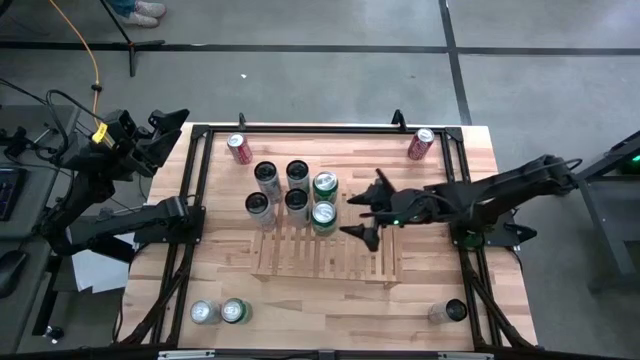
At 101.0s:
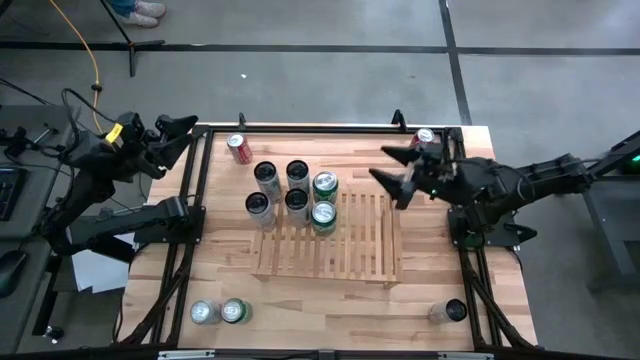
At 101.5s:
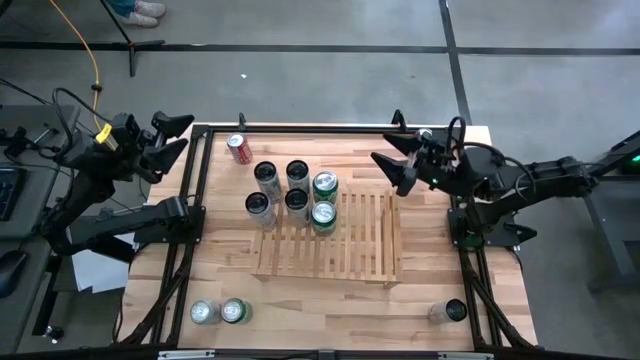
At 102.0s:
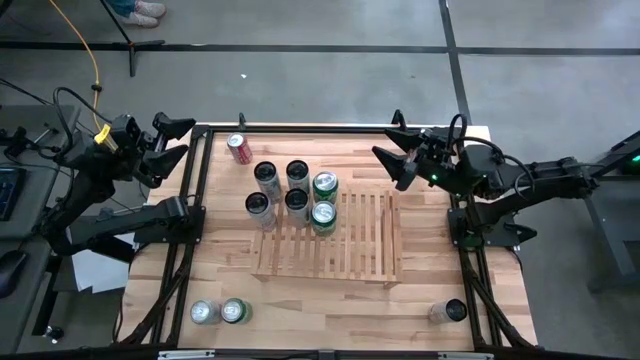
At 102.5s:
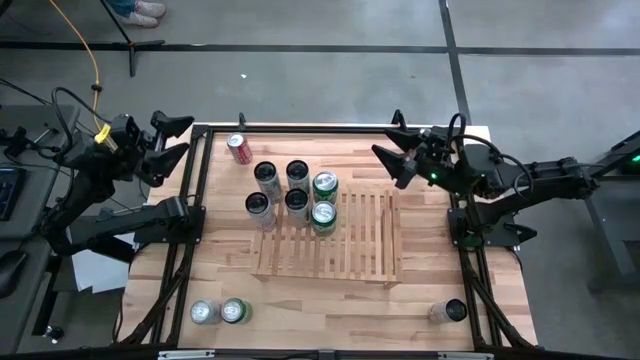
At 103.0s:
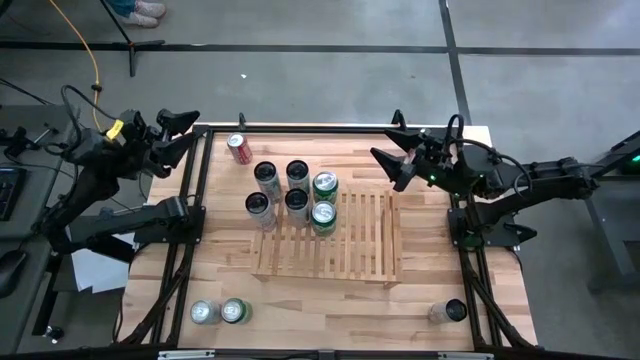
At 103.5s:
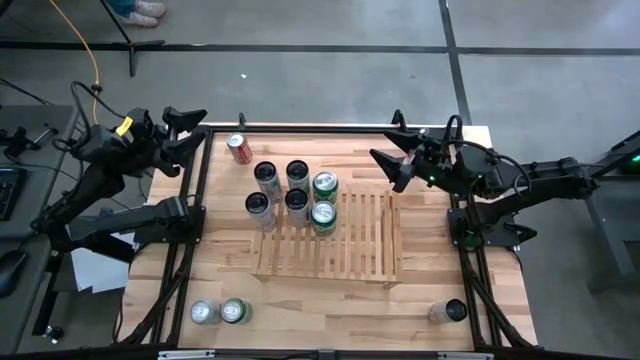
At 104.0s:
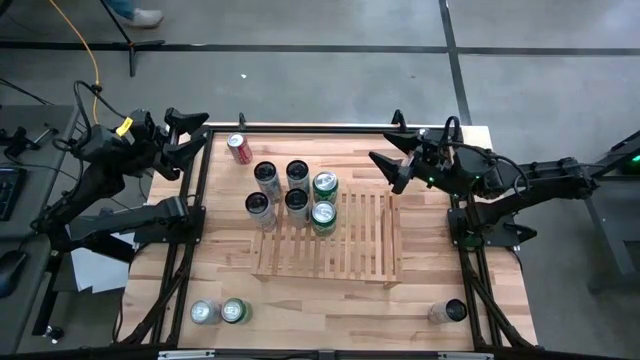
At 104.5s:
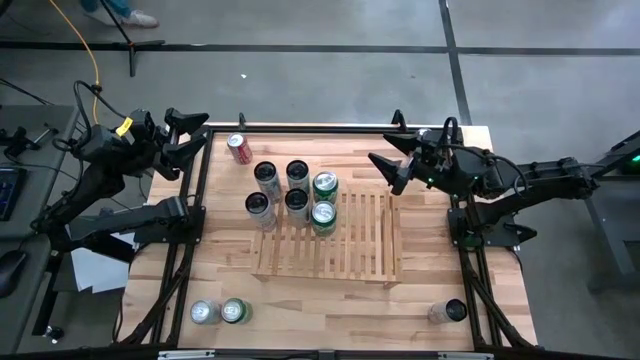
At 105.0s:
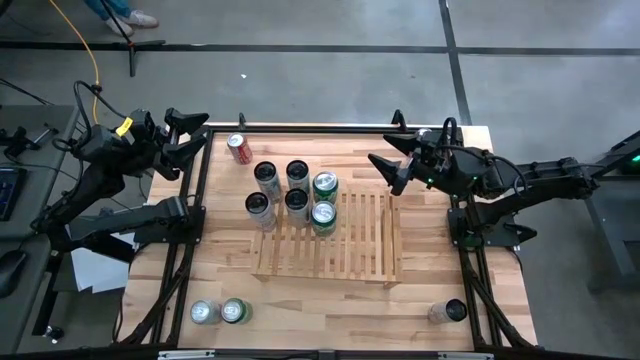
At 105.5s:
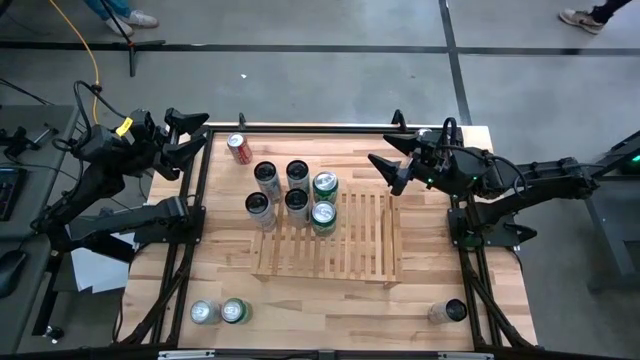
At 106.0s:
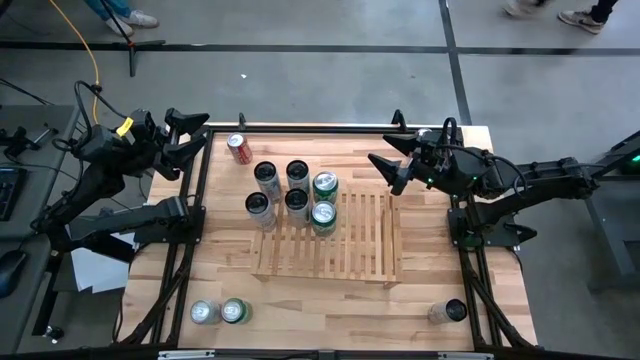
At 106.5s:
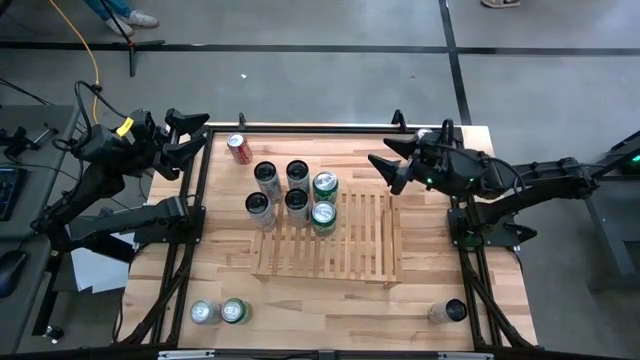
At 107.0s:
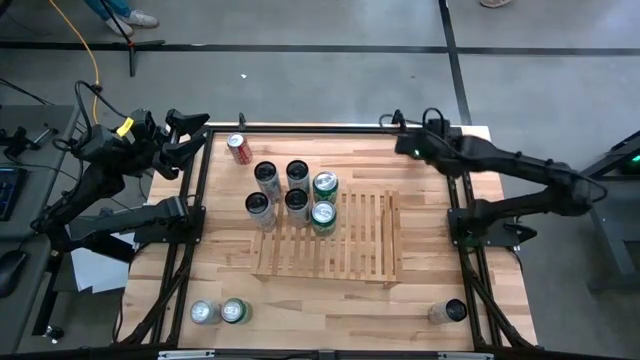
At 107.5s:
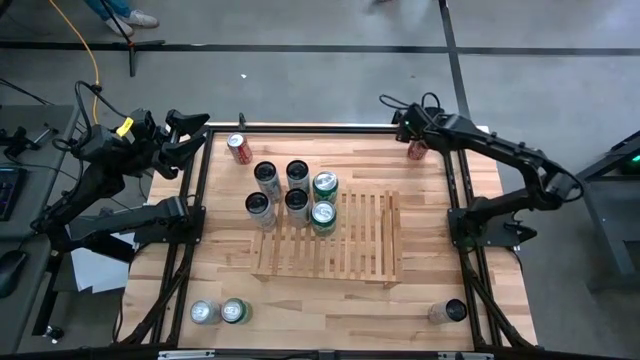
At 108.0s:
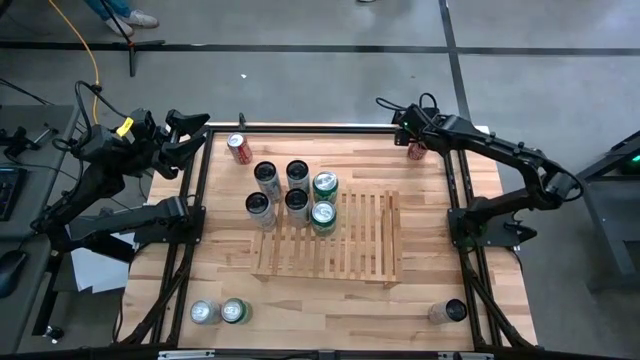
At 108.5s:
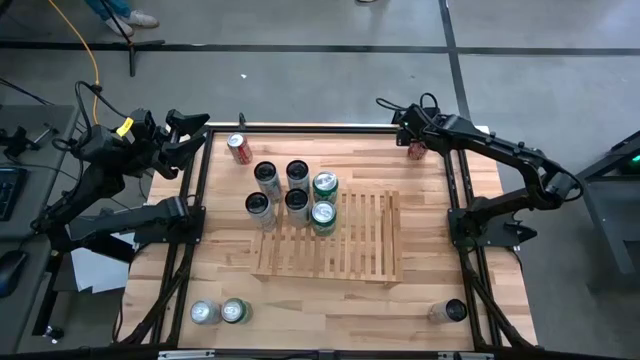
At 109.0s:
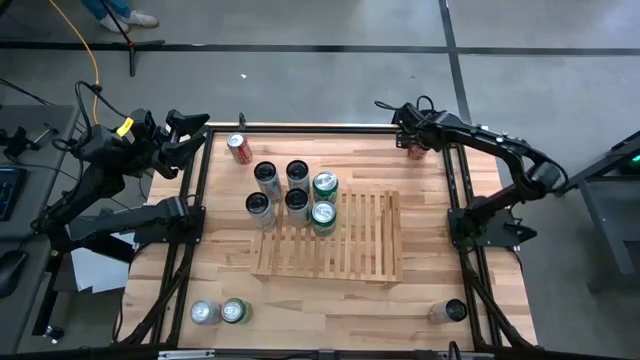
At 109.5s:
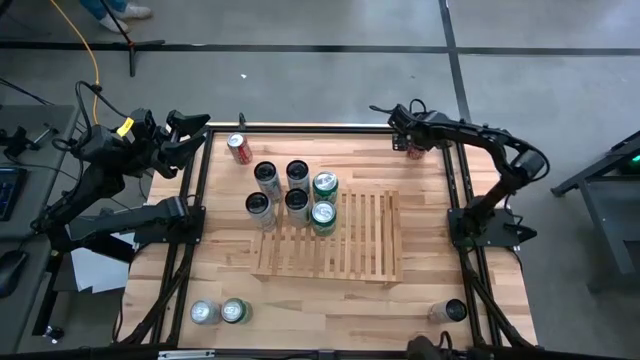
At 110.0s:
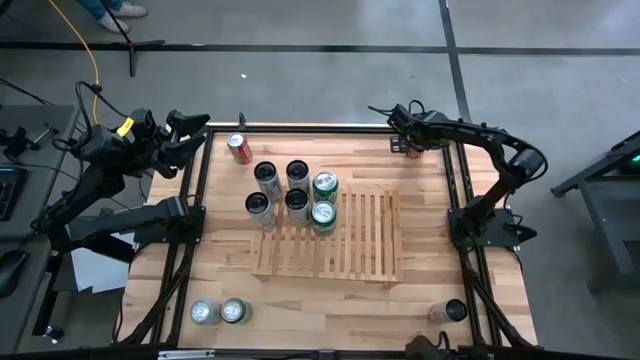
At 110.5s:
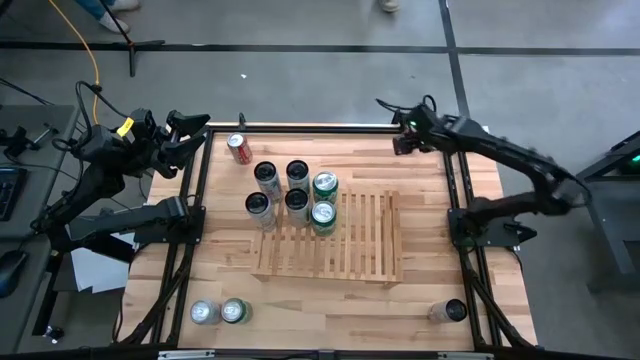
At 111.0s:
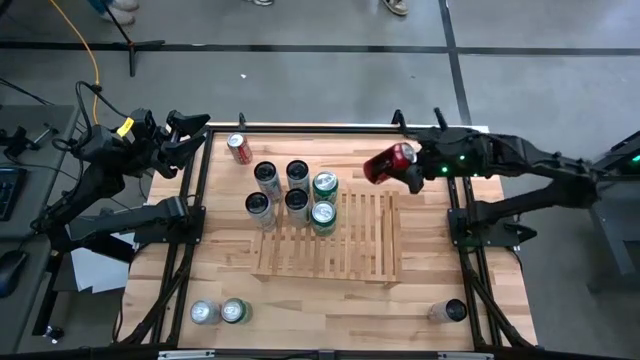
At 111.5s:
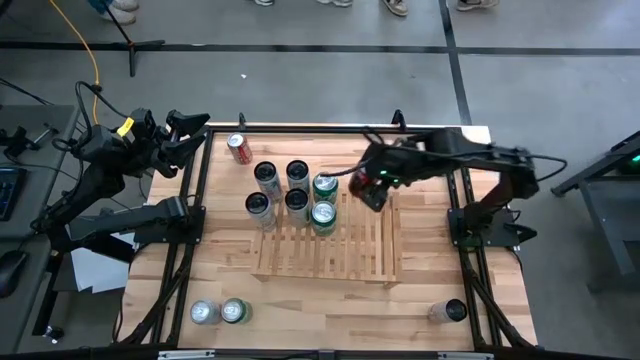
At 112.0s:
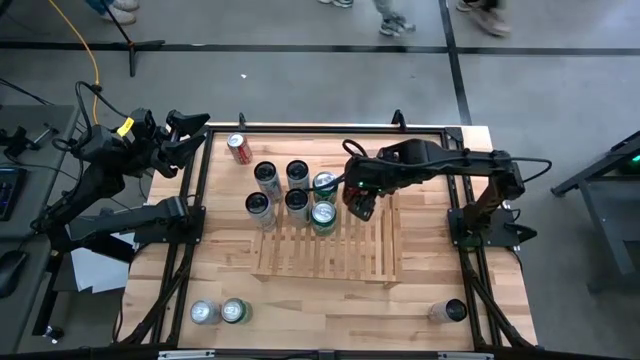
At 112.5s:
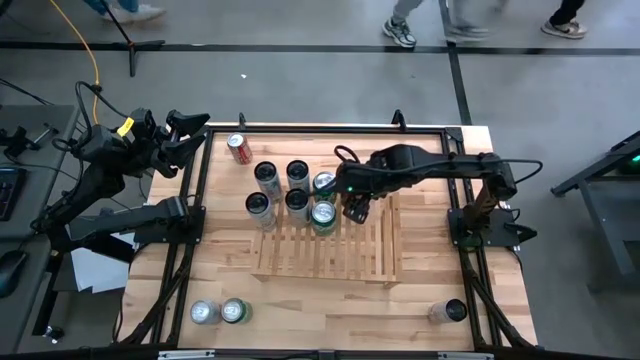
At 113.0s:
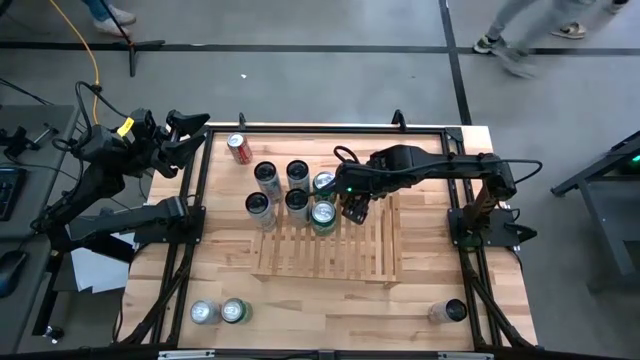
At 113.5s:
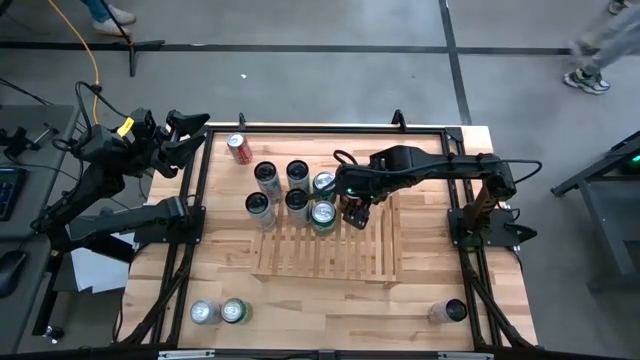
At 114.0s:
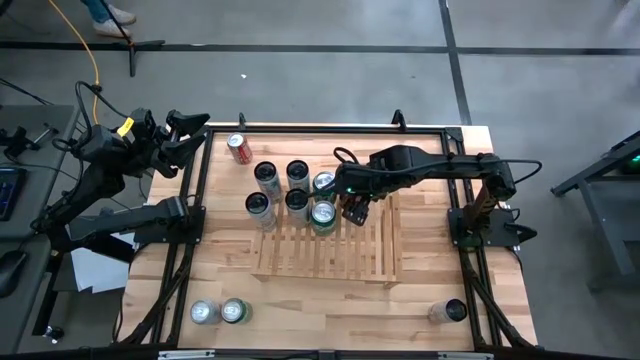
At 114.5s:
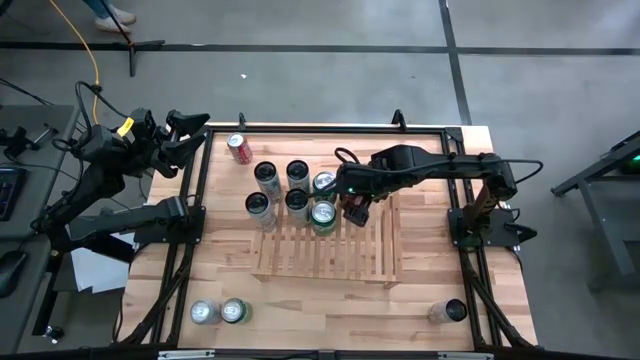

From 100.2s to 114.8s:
Task: Place canned beverage on shelf
Put the right red soda can on the shelf

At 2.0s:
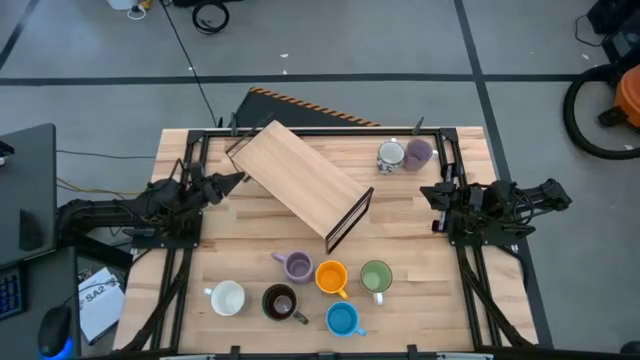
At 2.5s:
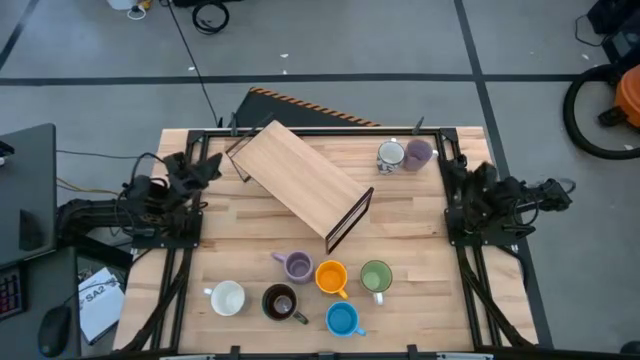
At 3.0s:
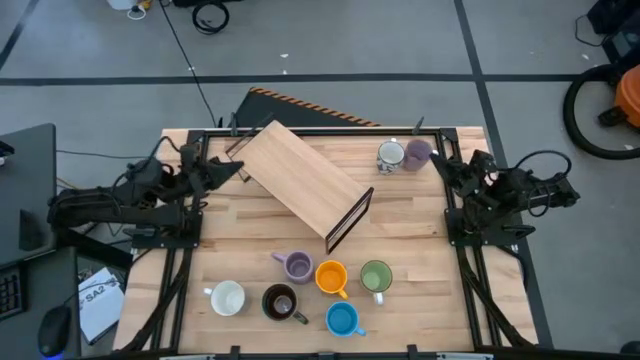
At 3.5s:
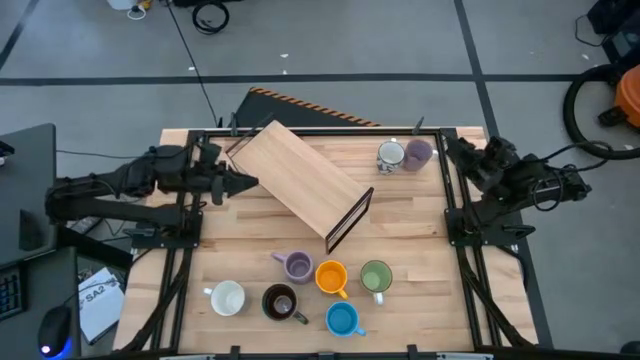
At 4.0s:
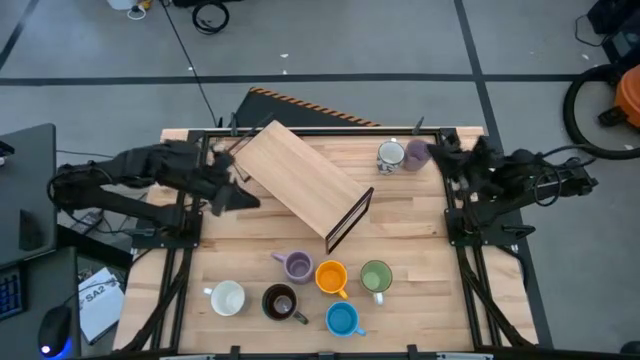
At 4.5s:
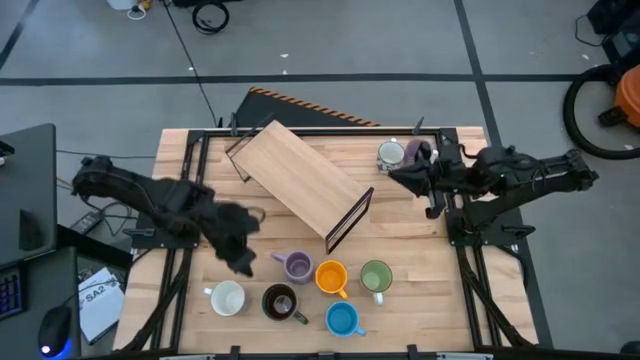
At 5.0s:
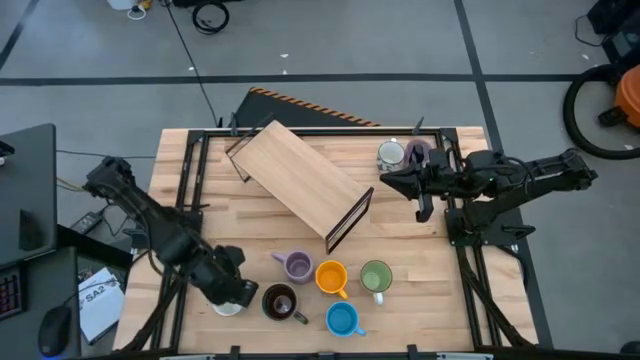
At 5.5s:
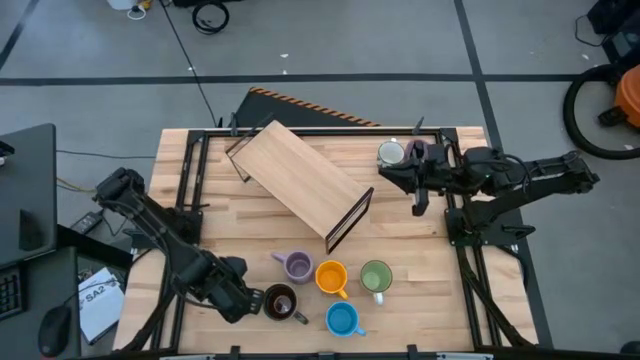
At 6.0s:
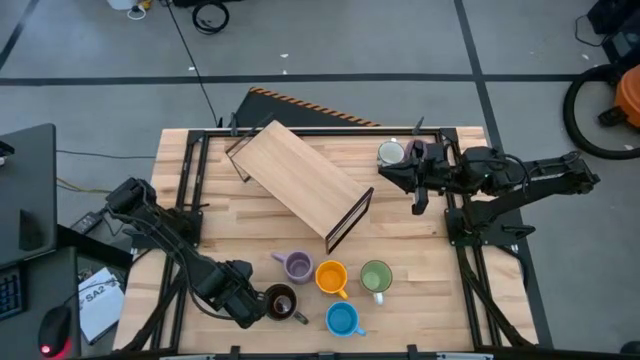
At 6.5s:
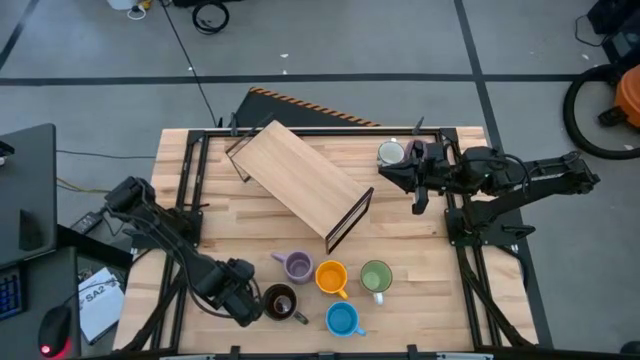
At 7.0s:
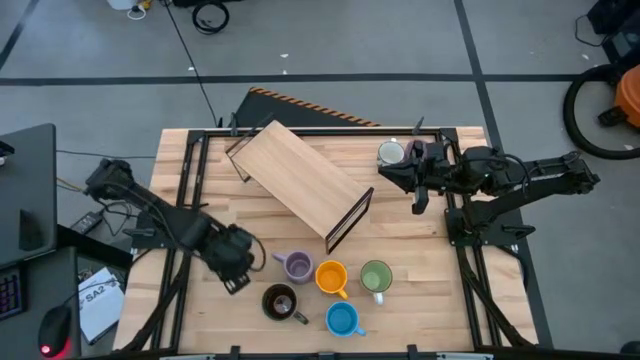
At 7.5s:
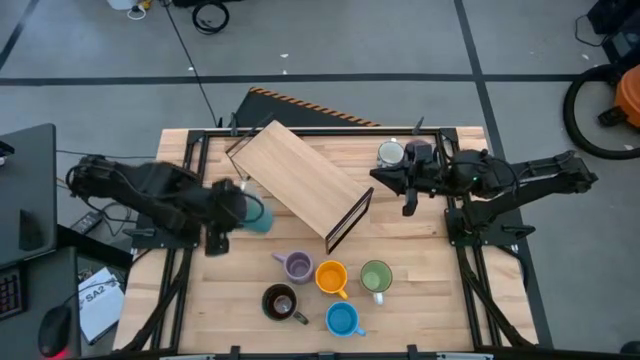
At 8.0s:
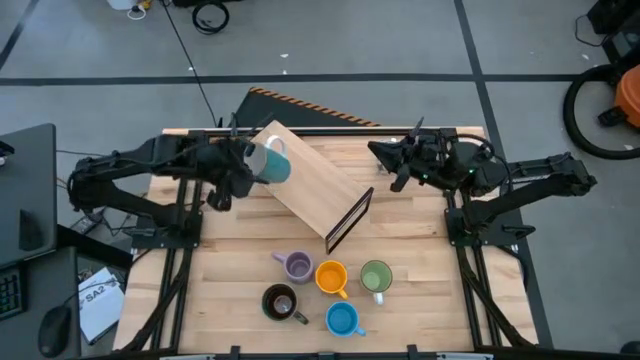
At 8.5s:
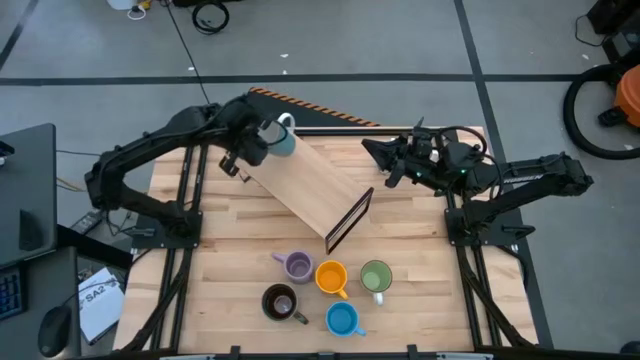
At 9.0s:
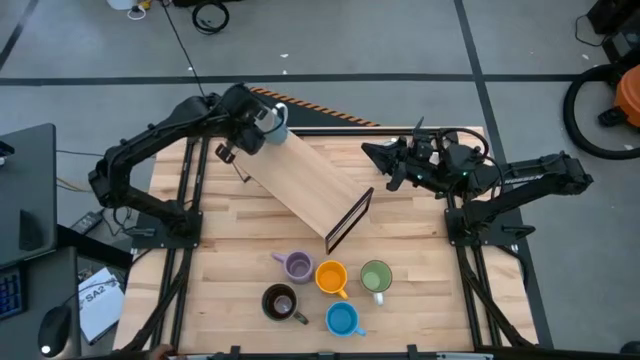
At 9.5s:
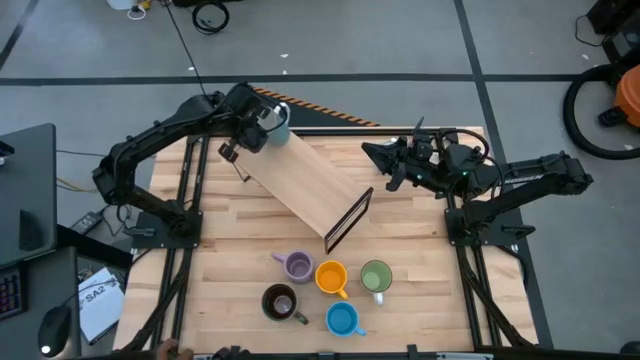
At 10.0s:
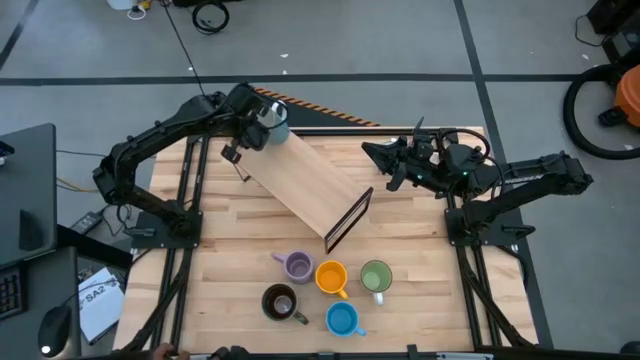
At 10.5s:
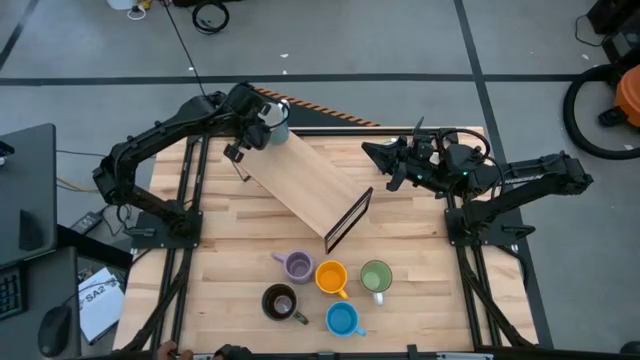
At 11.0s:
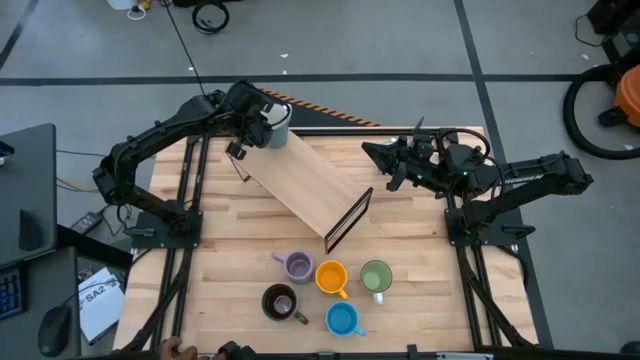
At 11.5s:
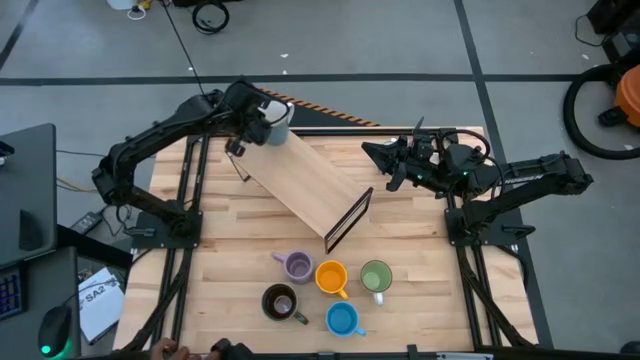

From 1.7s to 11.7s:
Task: Place coffee mugs
Put the light blue mug on the shelf
